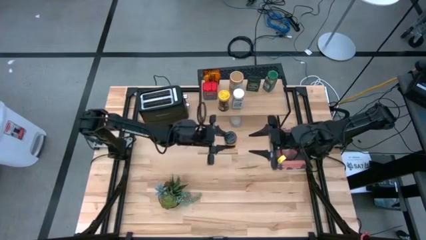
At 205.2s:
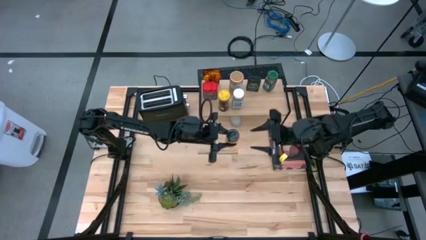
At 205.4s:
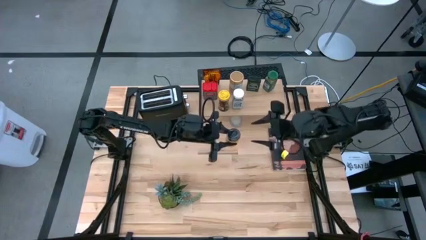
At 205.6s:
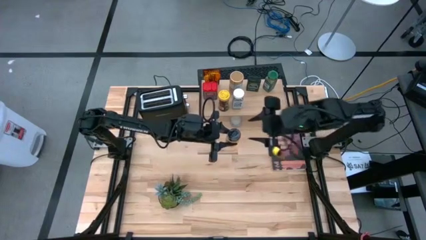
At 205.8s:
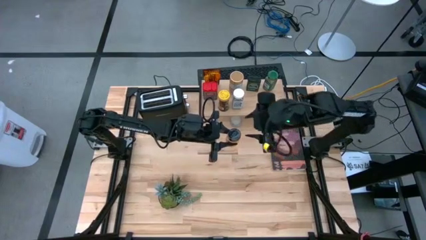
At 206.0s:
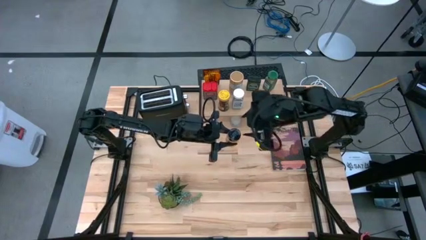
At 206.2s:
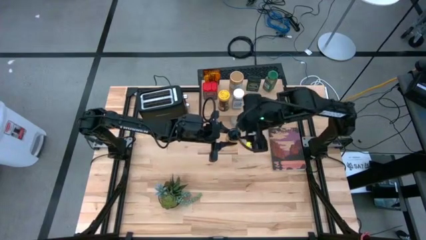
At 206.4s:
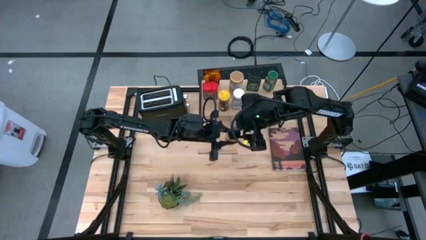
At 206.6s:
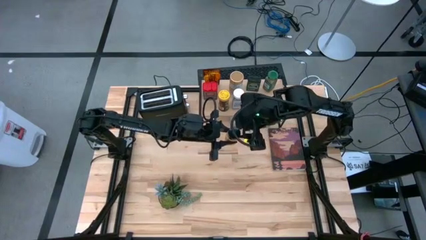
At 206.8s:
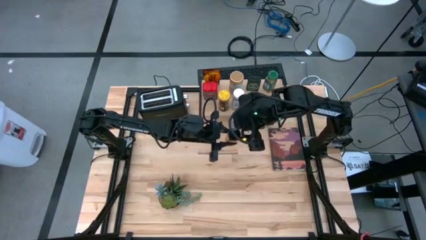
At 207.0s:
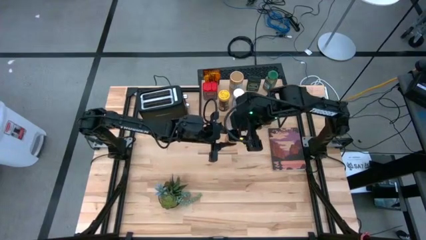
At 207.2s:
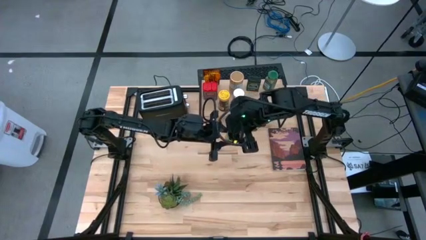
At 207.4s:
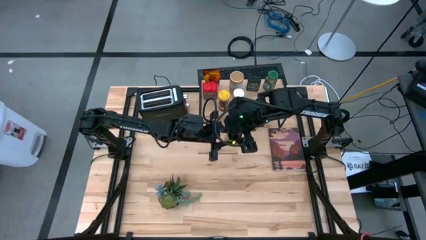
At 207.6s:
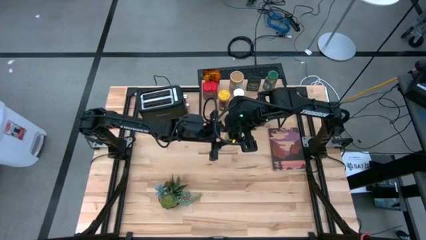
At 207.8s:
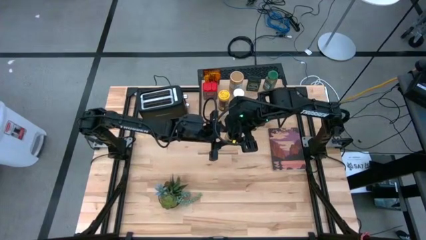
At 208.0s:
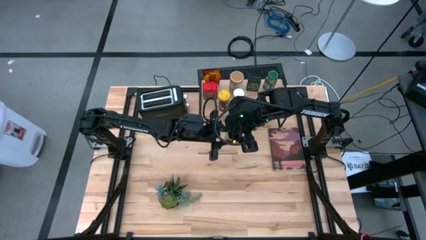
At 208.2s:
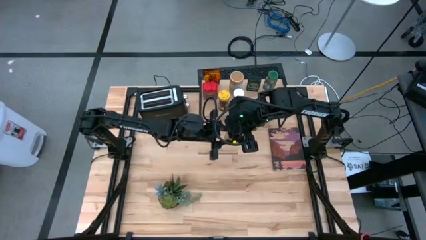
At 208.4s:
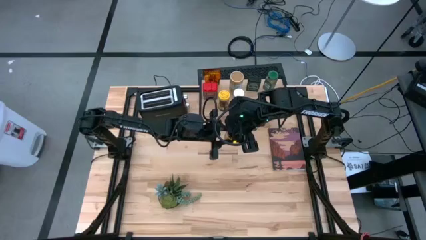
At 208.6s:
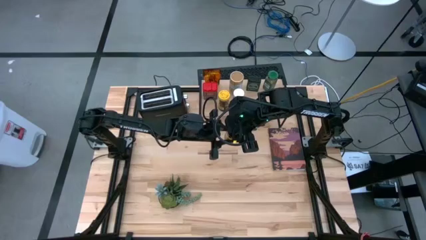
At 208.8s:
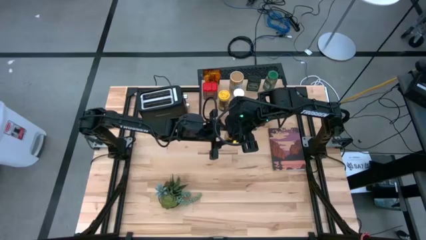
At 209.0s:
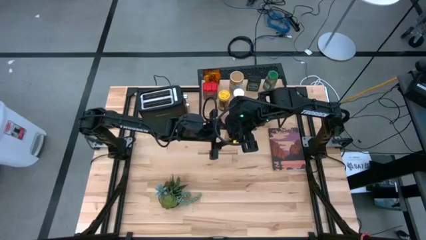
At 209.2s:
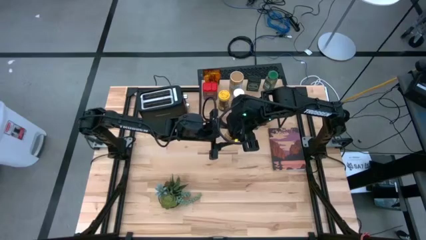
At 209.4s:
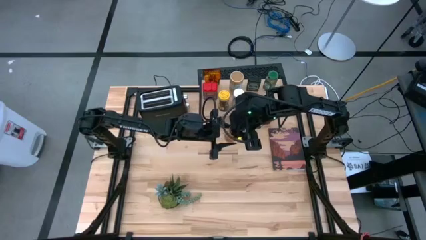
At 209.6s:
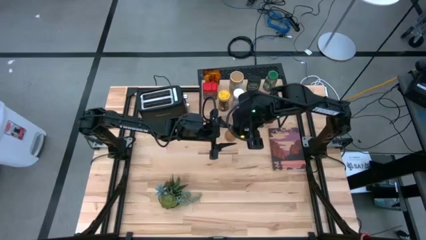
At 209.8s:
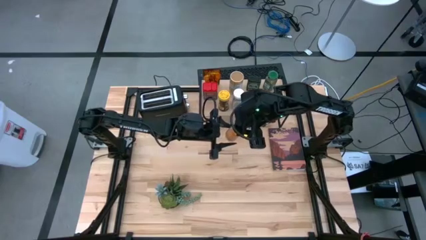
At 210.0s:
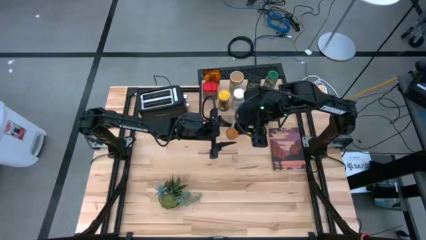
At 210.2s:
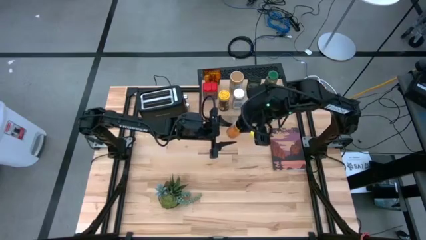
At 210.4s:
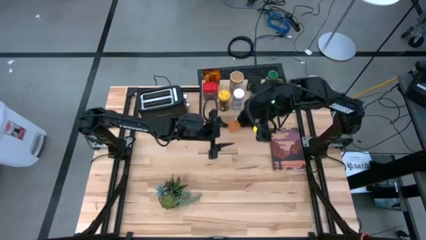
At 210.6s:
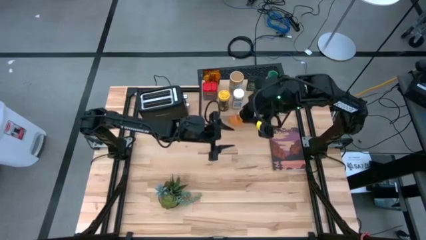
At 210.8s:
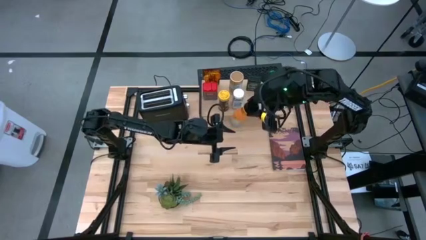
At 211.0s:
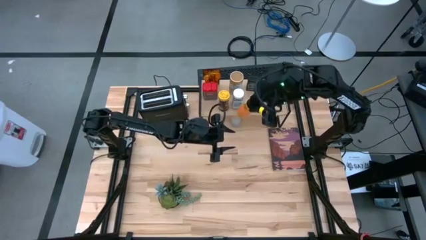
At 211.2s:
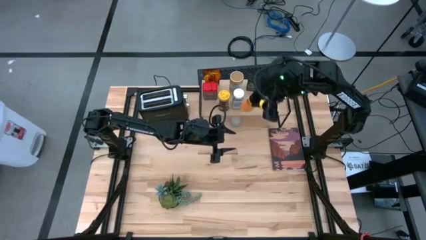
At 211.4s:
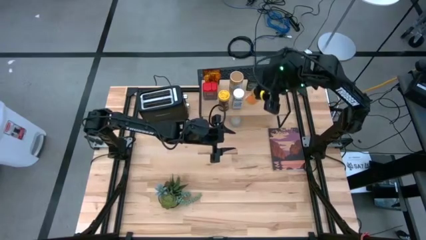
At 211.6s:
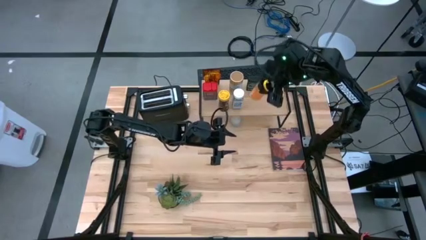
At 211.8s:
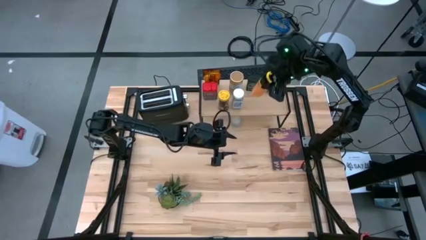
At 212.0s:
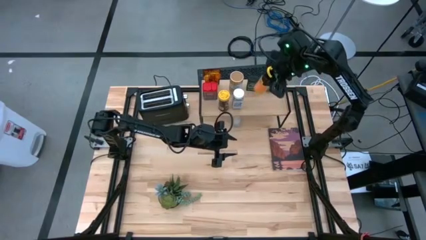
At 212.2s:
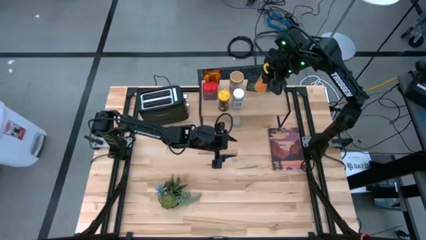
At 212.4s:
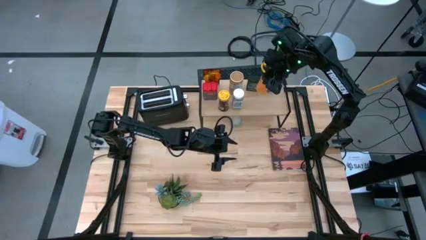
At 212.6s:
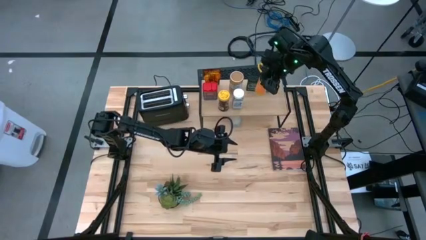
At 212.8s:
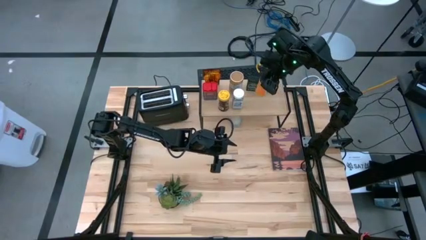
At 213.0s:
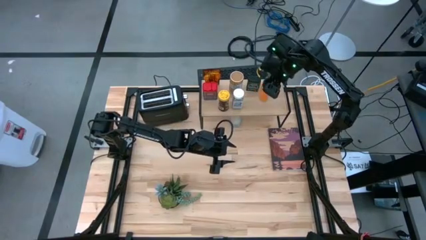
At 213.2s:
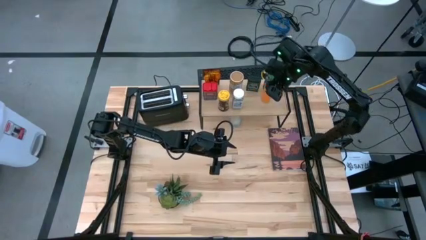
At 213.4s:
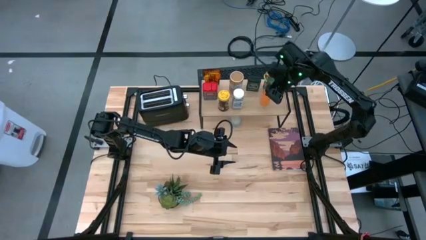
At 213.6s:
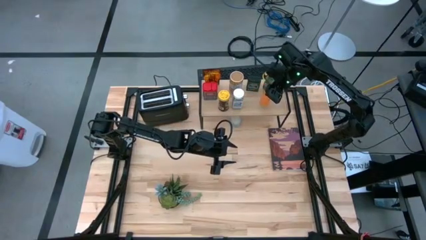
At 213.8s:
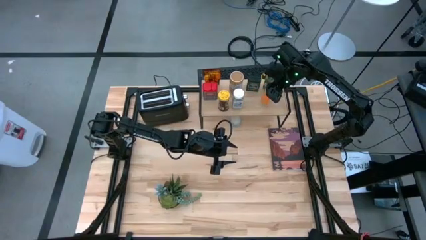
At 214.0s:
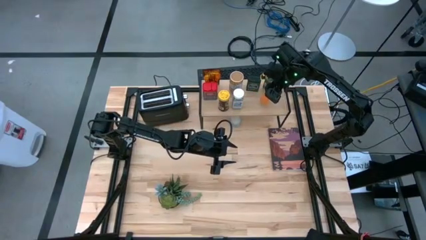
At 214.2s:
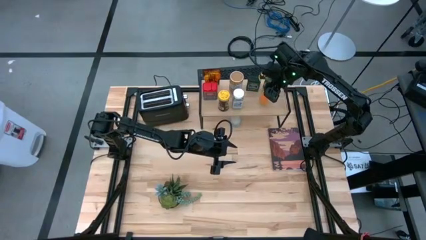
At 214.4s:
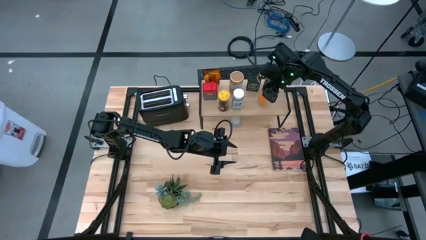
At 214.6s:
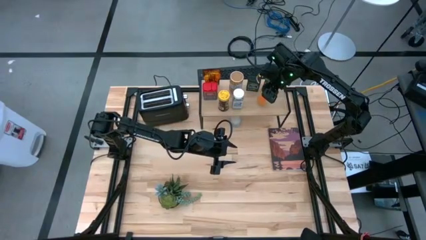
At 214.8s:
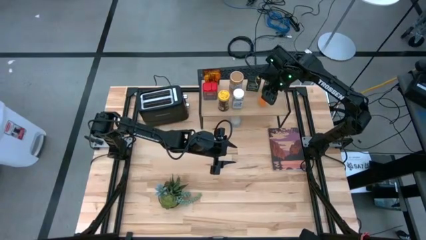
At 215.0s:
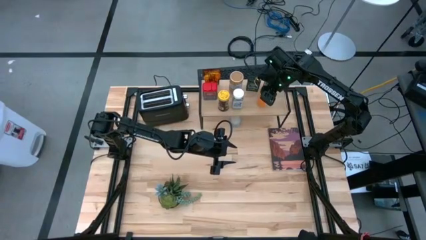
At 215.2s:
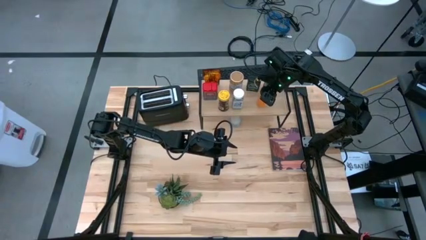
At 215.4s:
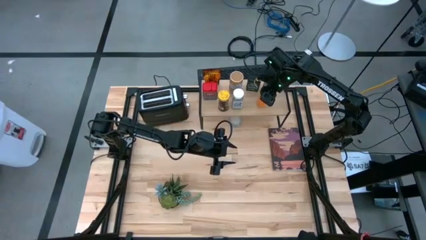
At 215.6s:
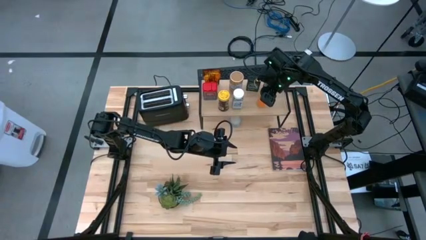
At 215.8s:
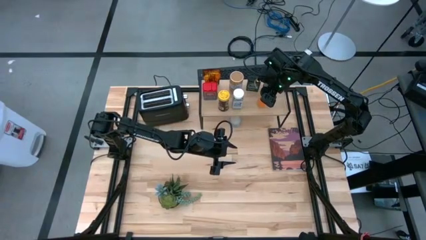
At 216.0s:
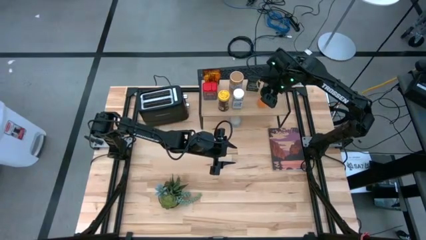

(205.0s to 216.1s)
Task: Shelf spices
Put the orange seasoning bottle on the shelf

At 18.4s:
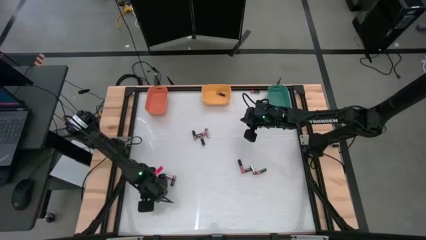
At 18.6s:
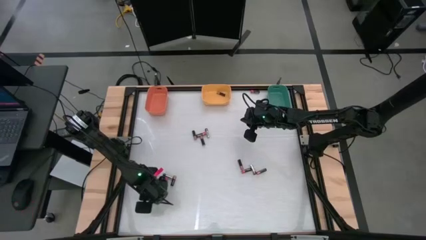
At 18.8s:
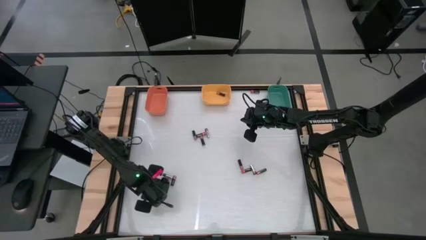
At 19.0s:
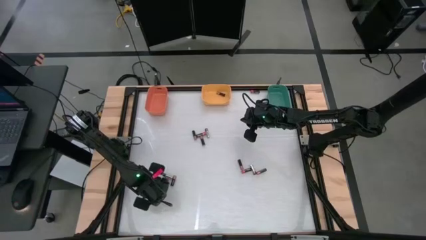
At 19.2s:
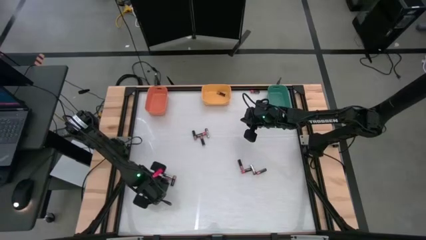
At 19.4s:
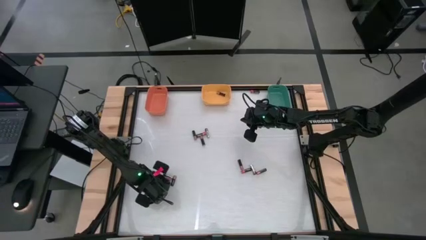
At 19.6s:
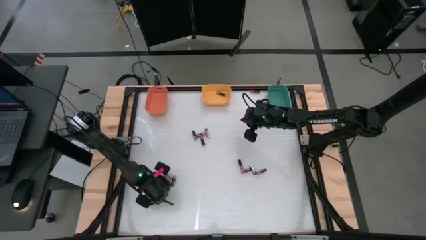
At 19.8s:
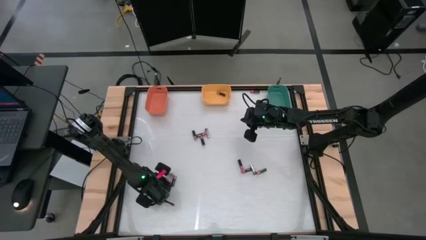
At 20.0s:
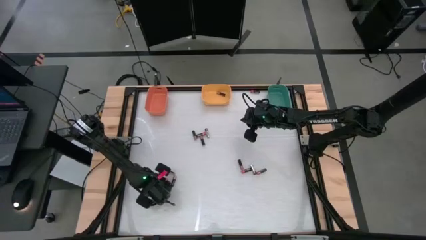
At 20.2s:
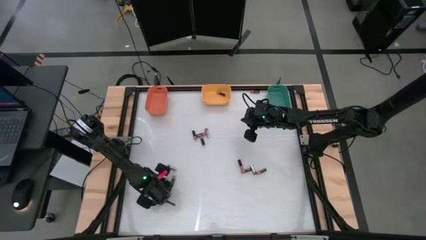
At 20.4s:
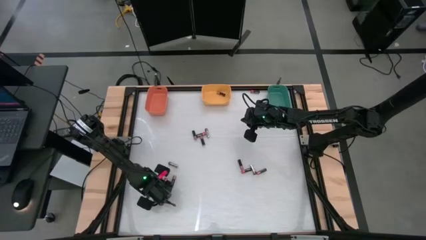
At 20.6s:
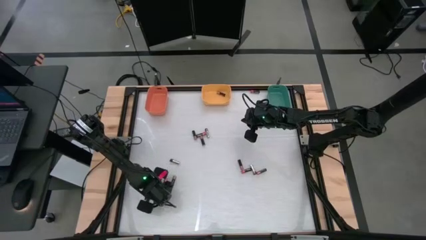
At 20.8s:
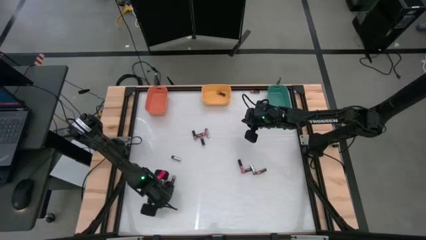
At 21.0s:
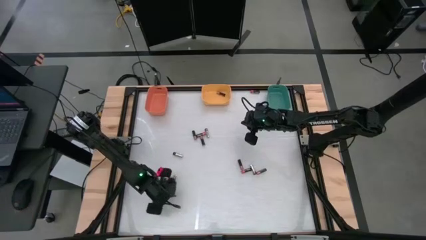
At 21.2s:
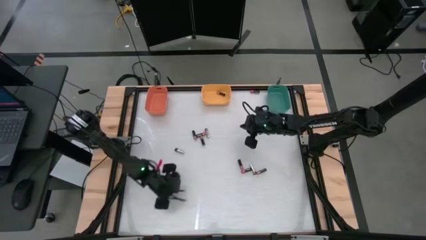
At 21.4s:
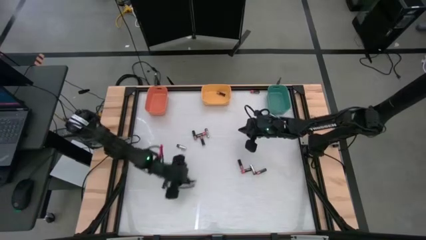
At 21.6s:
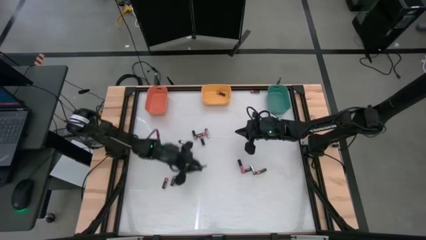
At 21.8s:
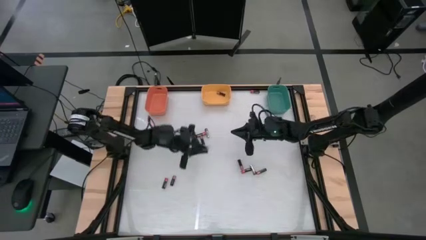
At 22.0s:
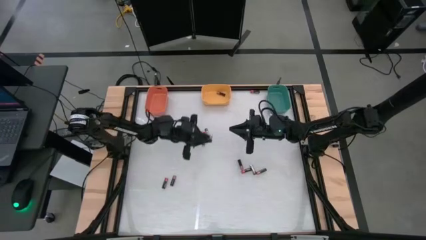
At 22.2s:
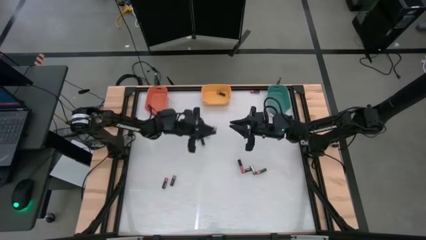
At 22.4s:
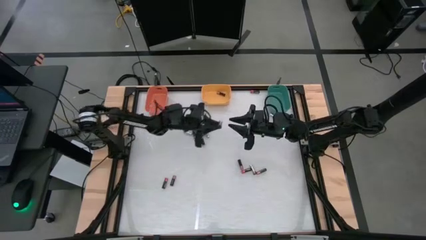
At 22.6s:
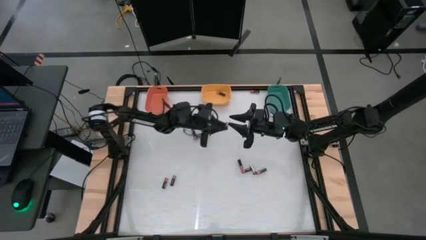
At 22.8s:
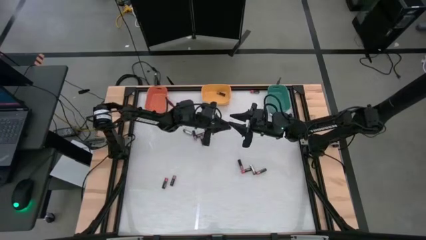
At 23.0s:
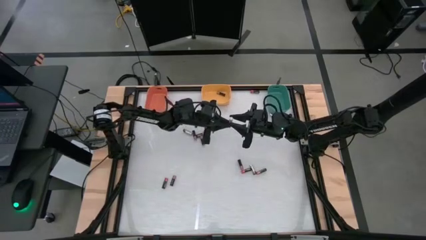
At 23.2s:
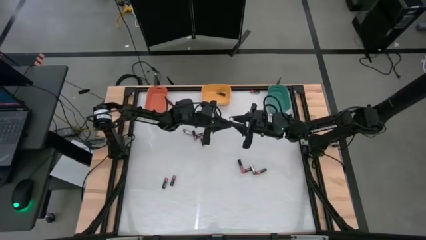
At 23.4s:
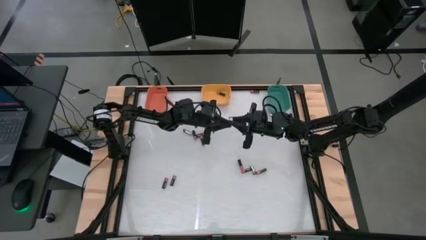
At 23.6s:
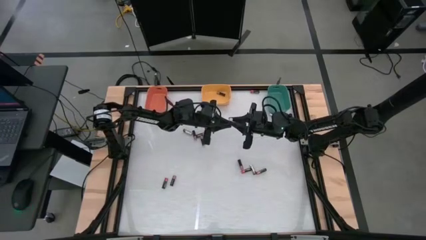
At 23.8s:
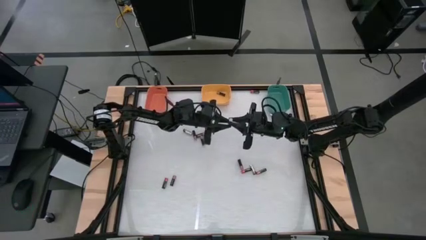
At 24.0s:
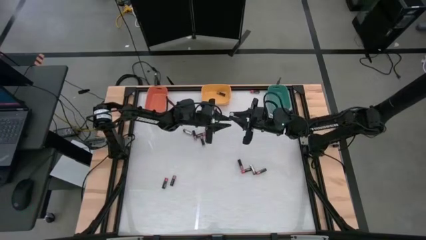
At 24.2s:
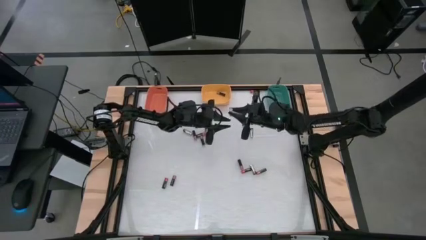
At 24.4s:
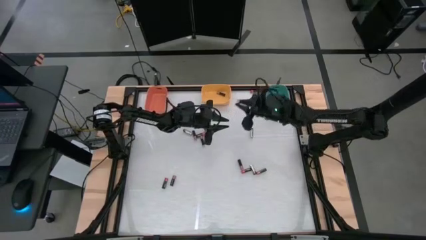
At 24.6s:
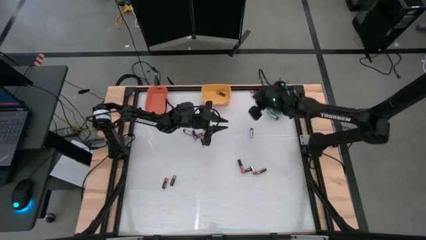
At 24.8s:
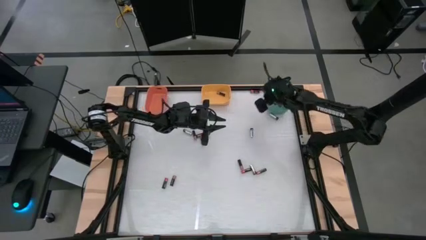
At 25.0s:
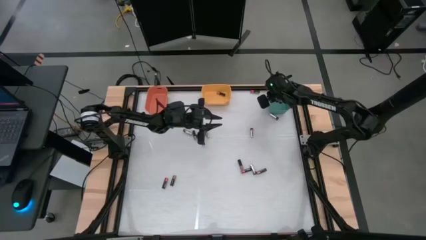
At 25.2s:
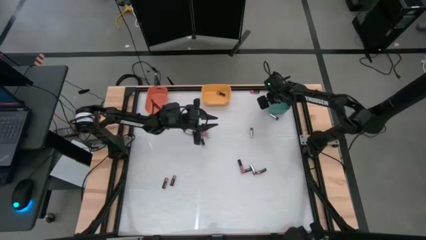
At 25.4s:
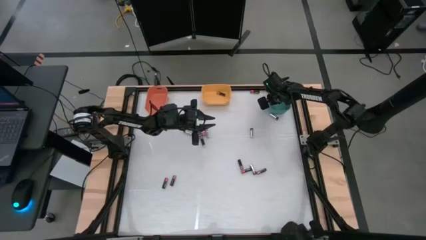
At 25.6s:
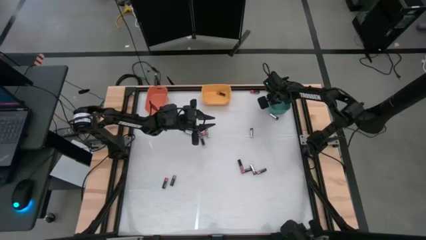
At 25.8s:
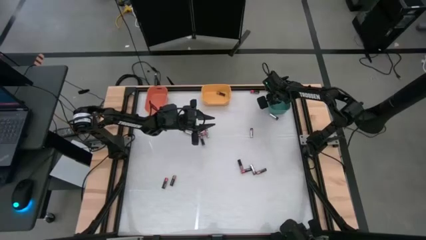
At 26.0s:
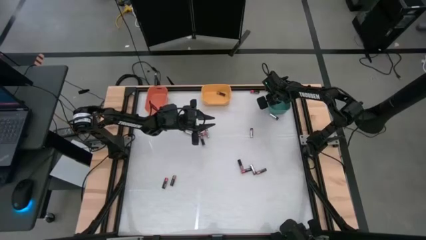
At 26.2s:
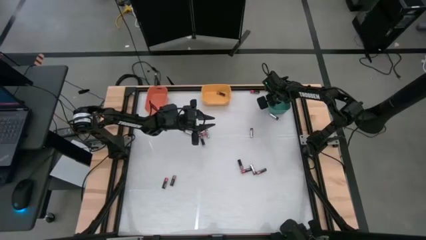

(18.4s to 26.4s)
Task: Sort batteries
Put the black battery into the green bin
